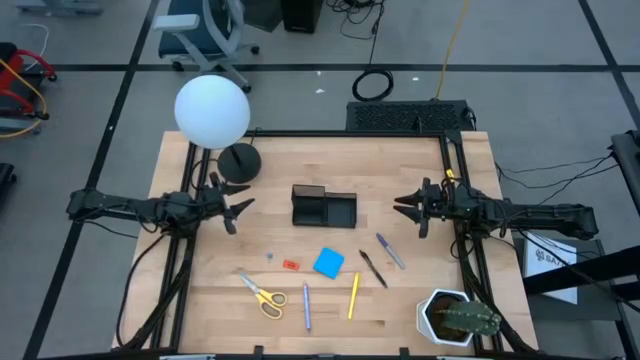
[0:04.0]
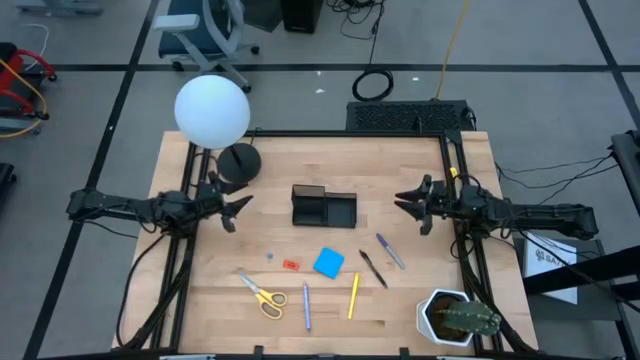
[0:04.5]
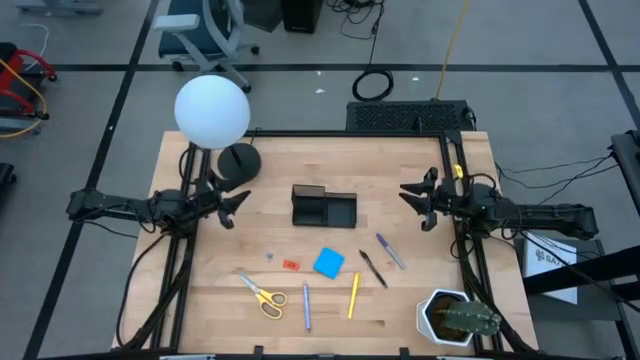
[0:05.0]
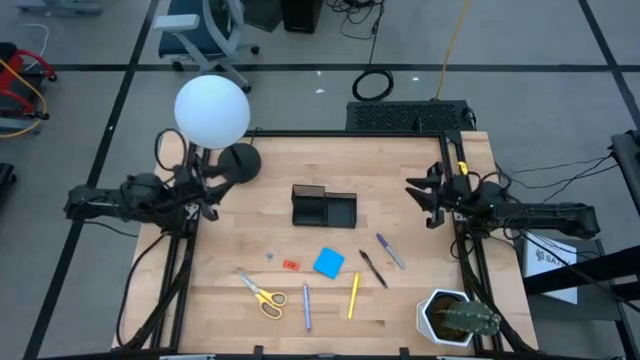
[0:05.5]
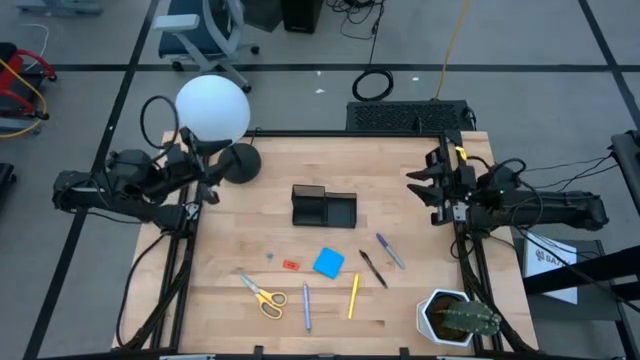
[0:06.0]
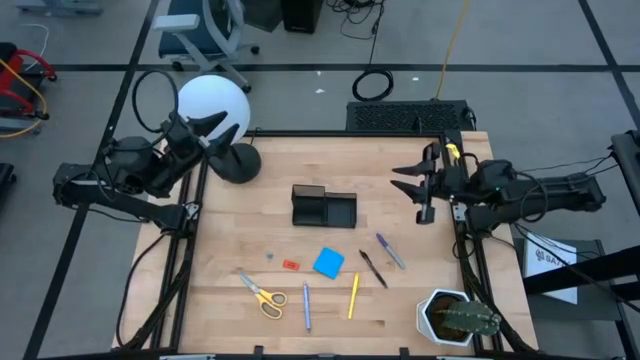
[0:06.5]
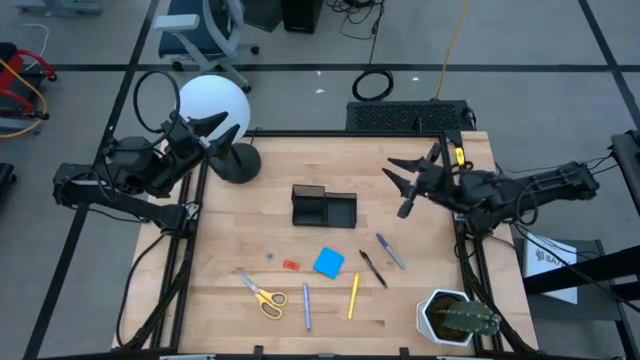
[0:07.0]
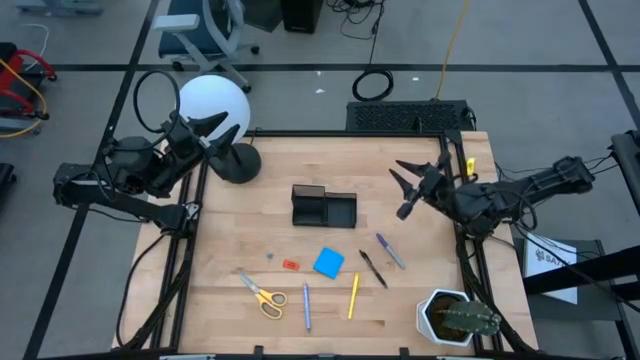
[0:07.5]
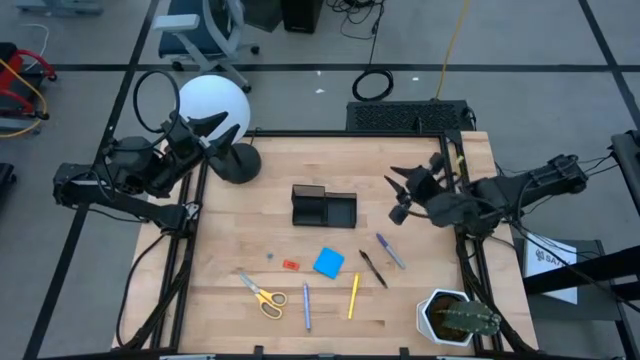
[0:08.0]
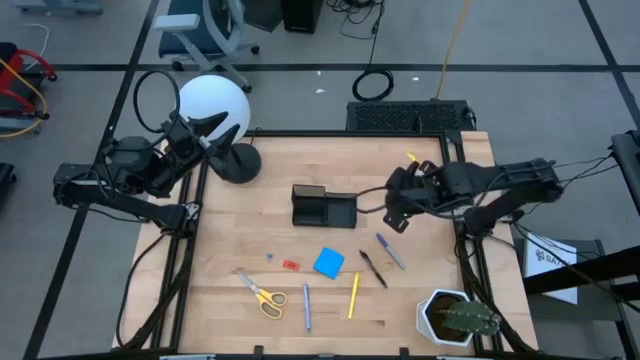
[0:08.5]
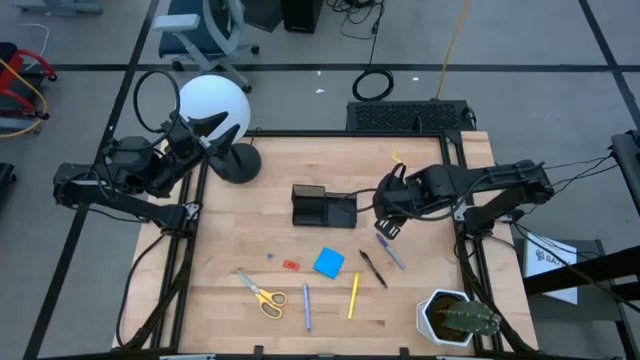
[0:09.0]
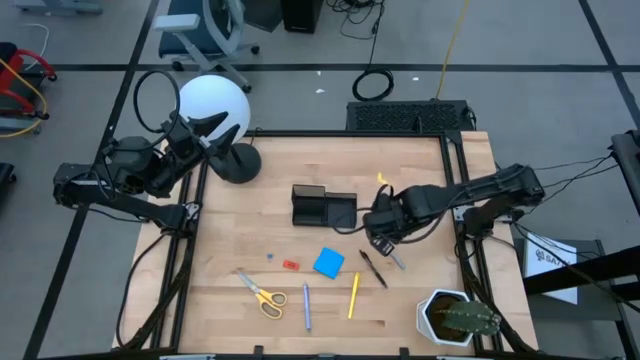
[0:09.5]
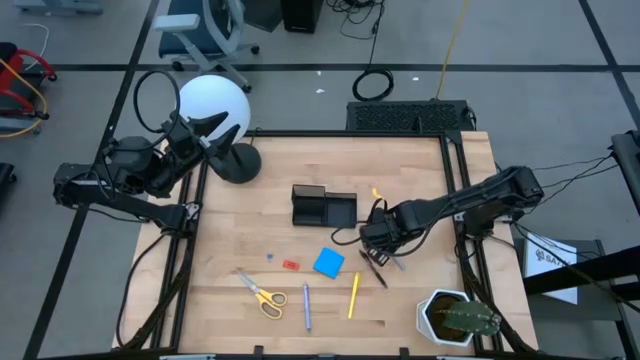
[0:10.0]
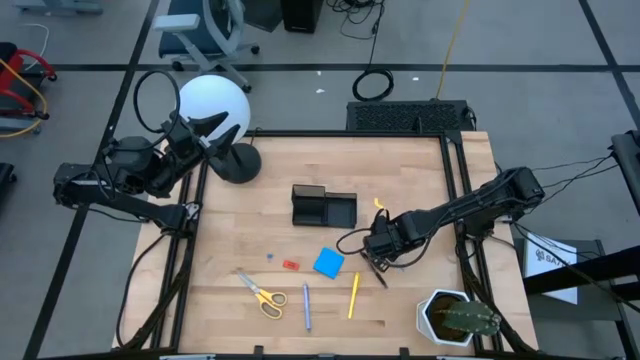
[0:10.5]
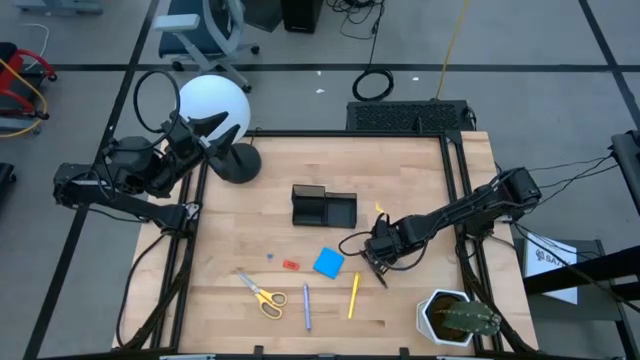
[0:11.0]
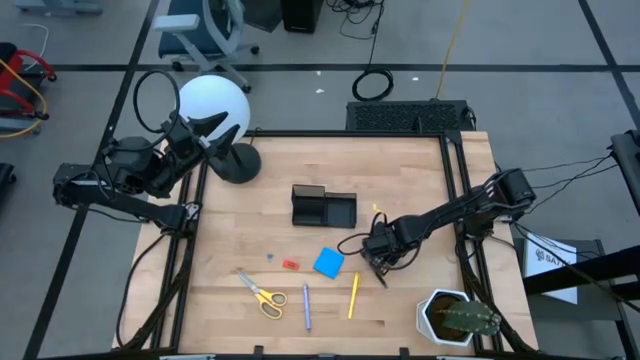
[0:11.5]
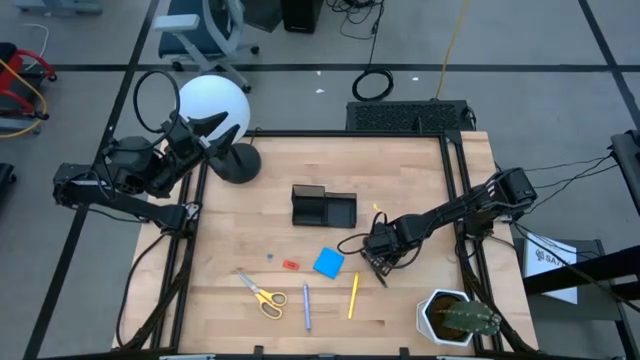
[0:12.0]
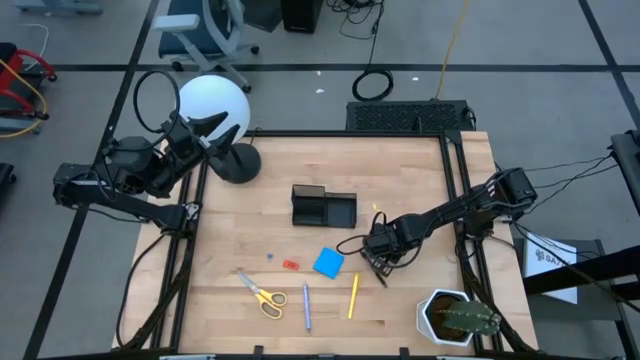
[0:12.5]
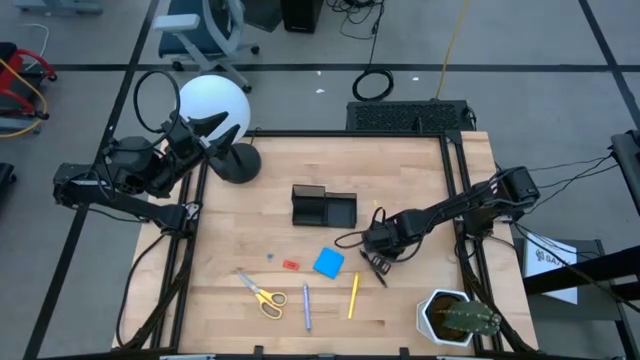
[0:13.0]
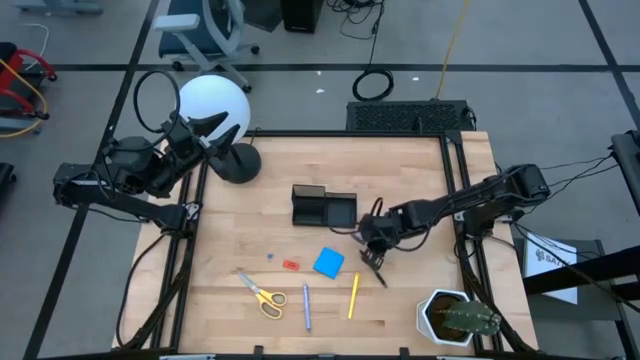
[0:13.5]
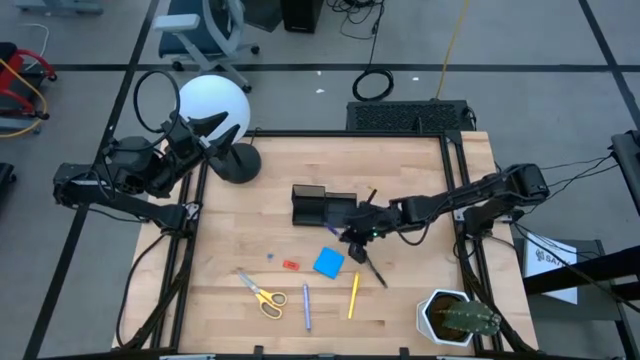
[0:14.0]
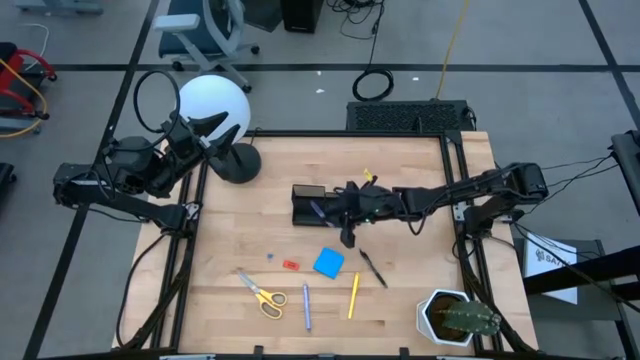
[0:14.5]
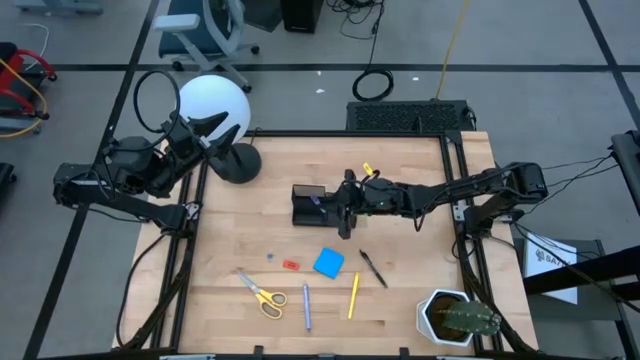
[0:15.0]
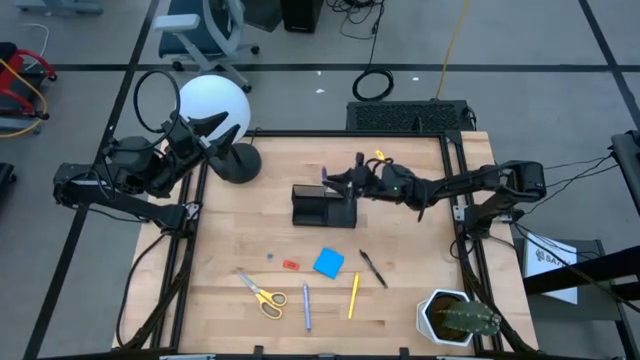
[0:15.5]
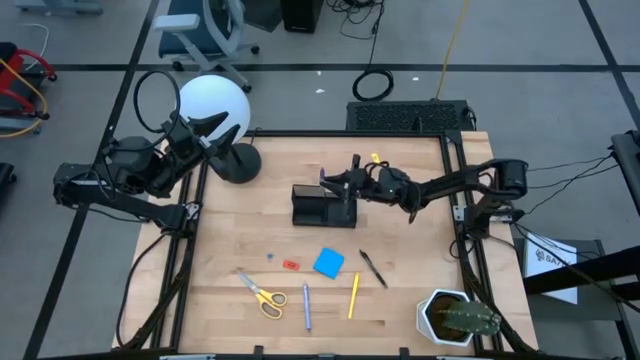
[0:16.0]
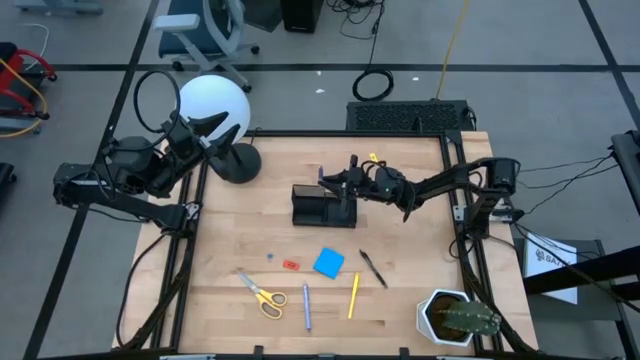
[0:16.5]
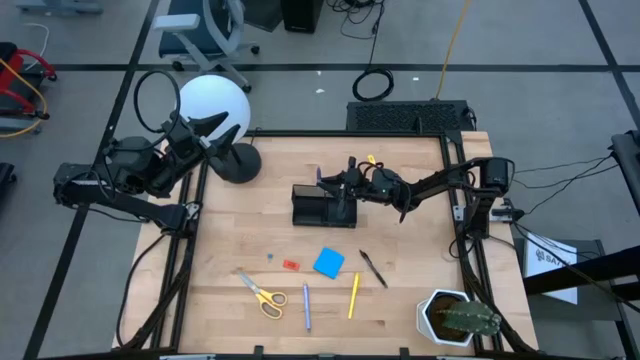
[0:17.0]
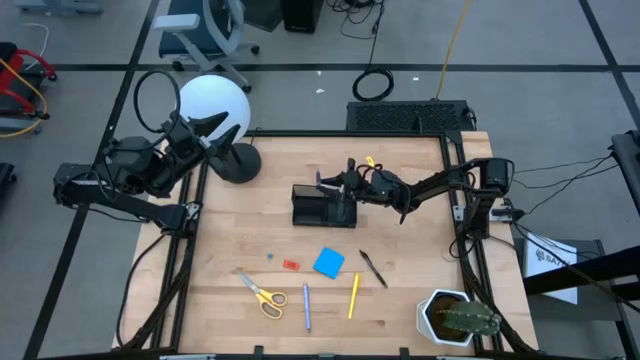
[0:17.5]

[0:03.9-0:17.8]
Task: Pick and place office supplies into organizer
Put the gray pen into the desk organizer

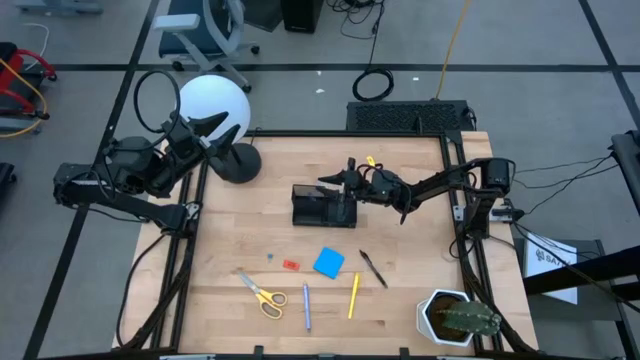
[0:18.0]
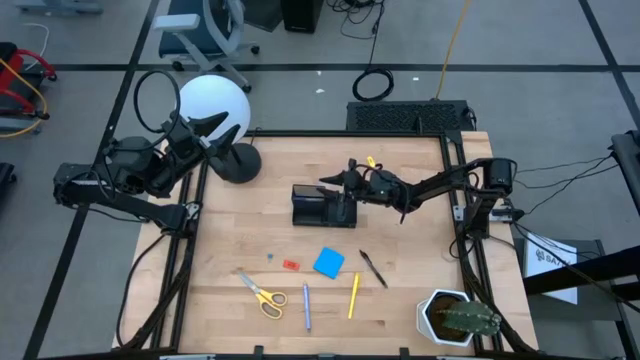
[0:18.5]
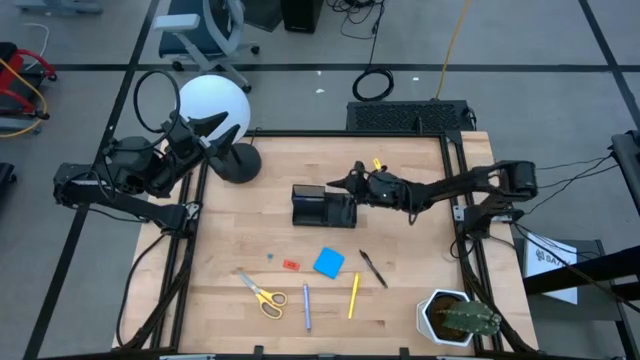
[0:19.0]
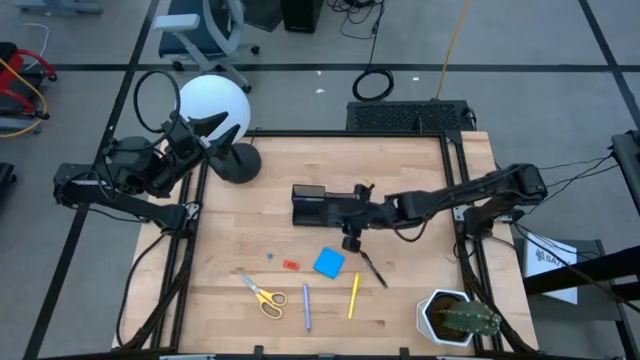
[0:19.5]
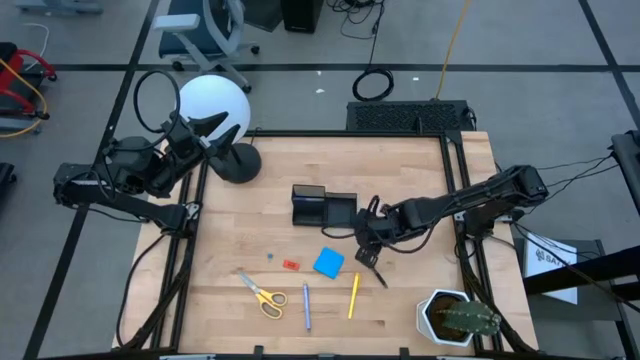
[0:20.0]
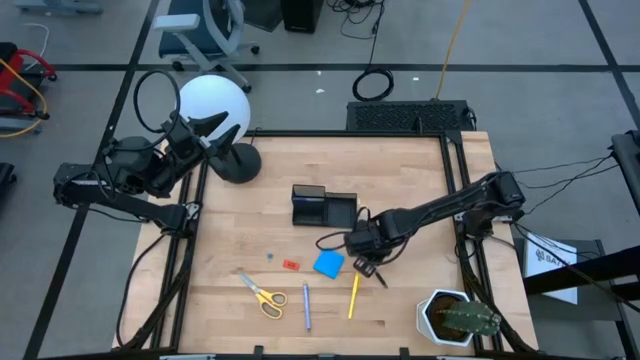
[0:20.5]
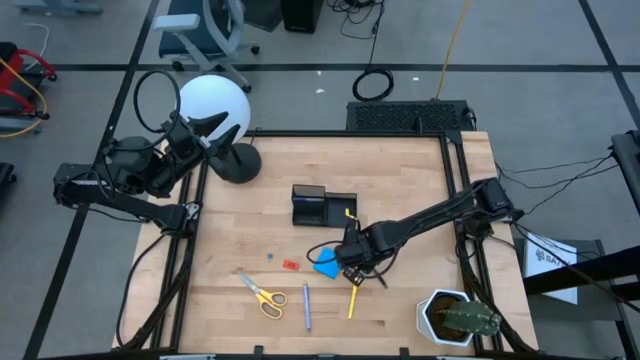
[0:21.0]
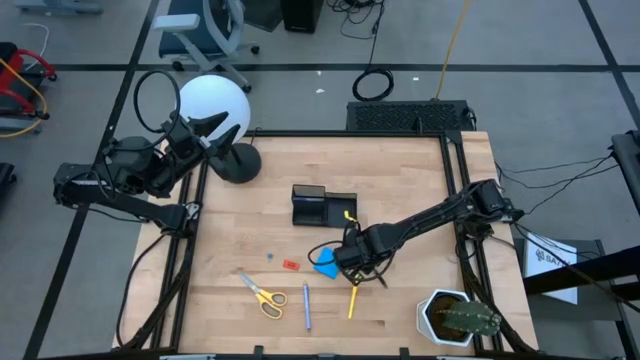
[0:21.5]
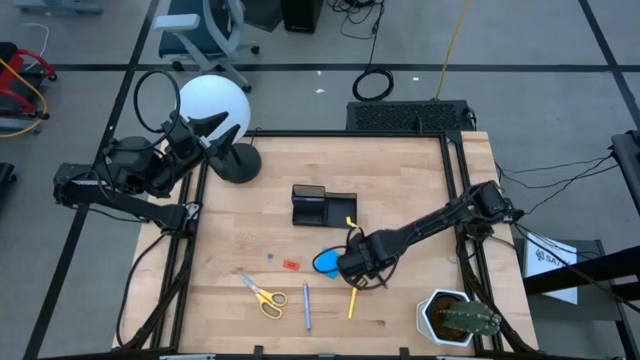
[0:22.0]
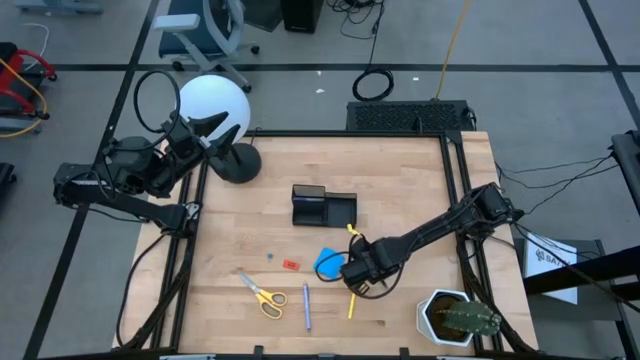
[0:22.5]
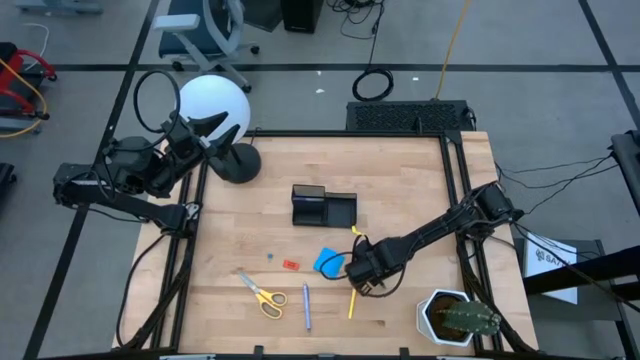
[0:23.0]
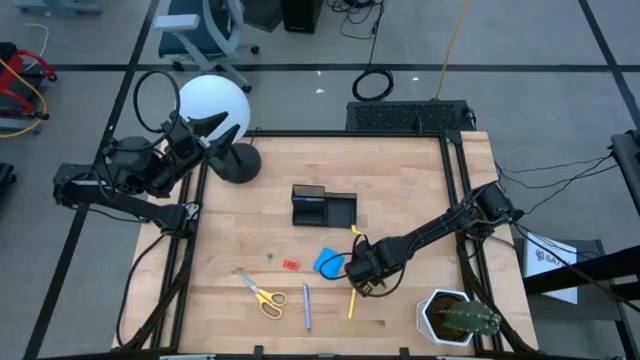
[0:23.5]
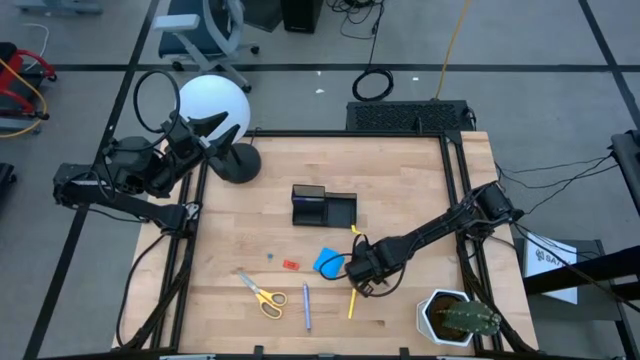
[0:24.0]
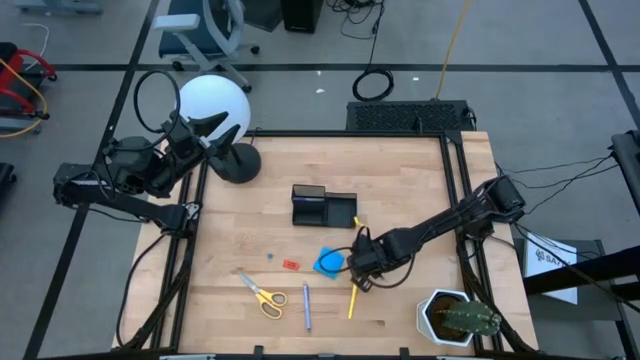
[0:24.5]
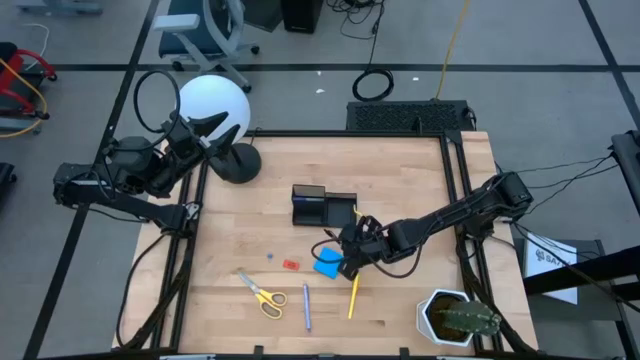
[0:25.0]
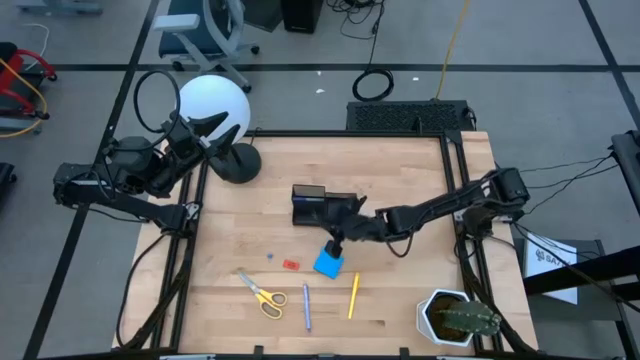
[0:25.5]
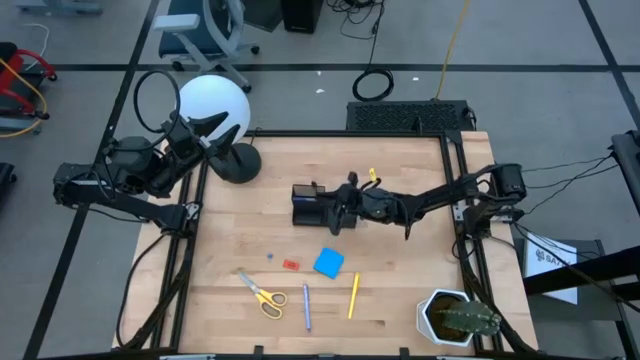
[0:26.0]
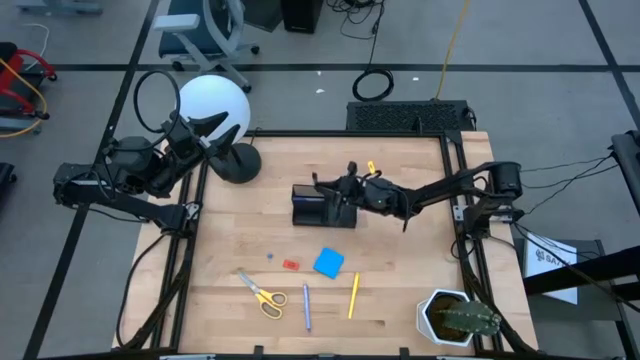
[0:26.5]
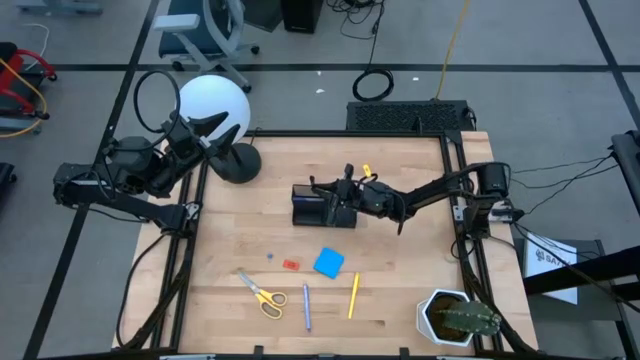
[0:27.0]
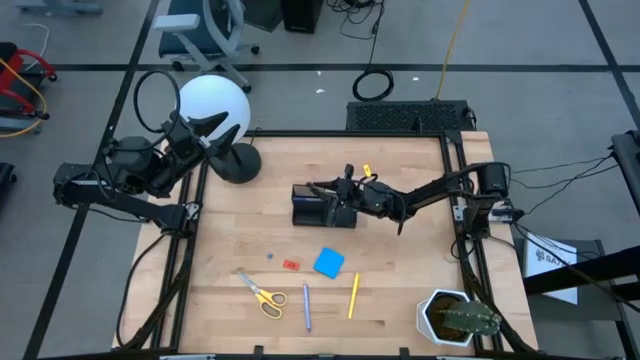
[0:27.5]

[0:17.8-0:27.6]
Put the black pen into the desk organizer
